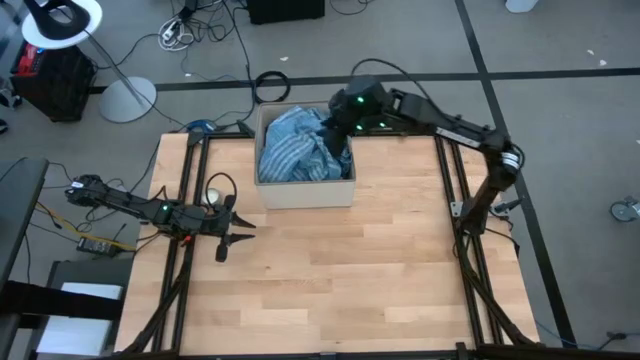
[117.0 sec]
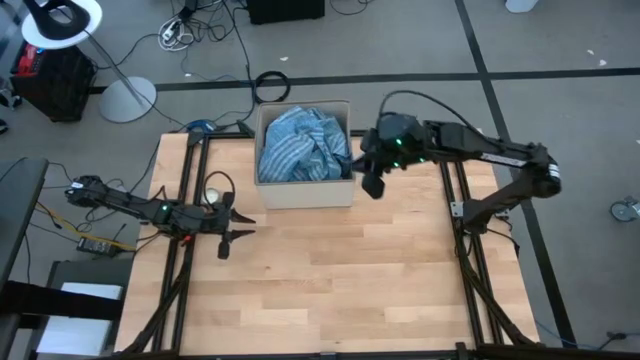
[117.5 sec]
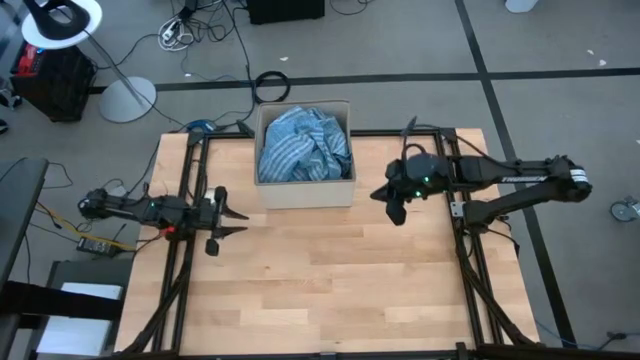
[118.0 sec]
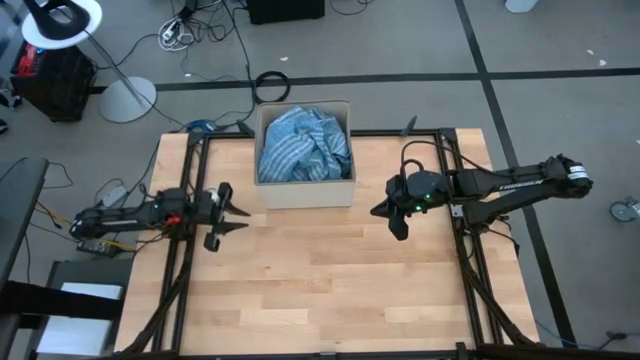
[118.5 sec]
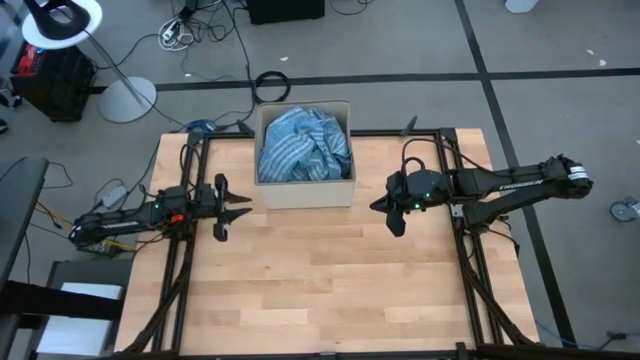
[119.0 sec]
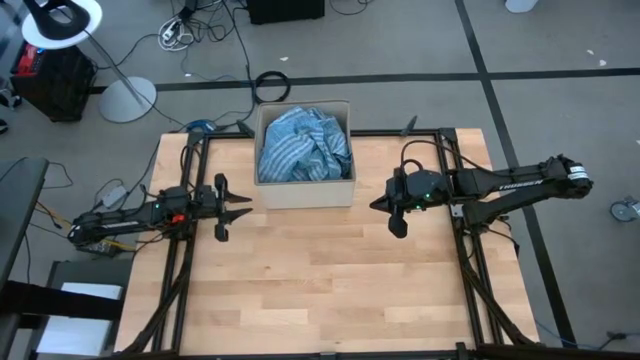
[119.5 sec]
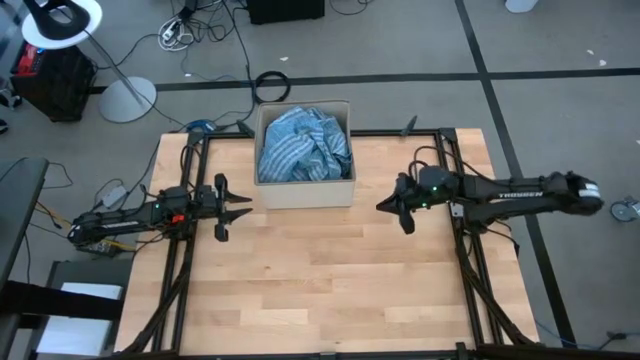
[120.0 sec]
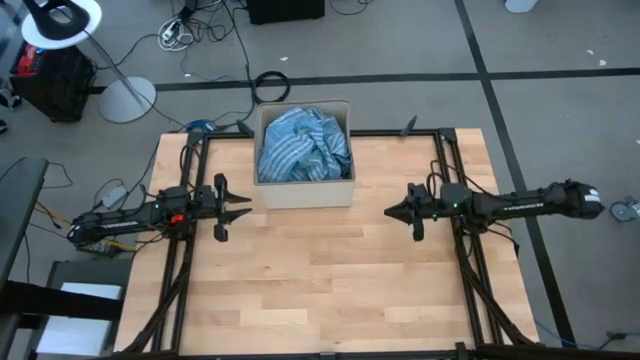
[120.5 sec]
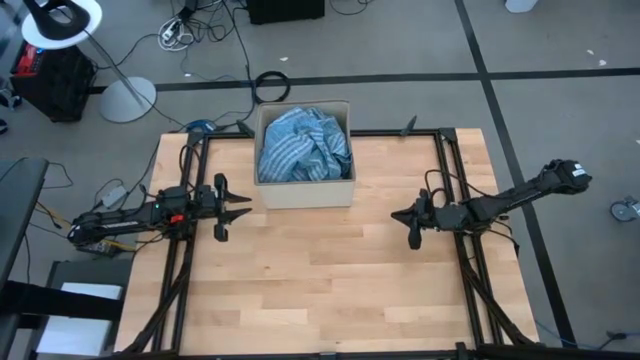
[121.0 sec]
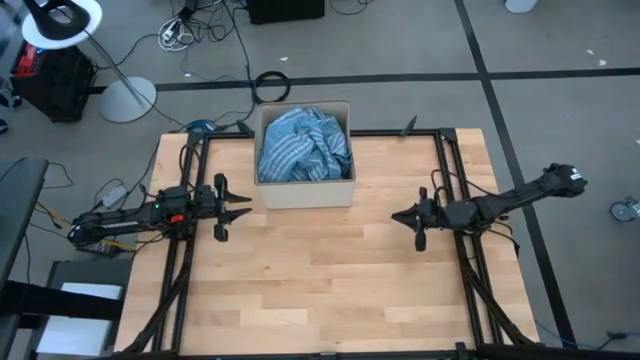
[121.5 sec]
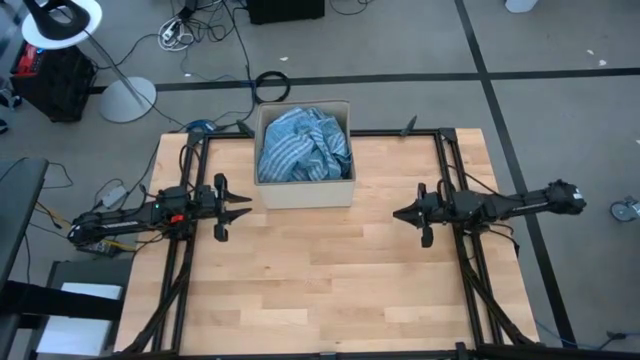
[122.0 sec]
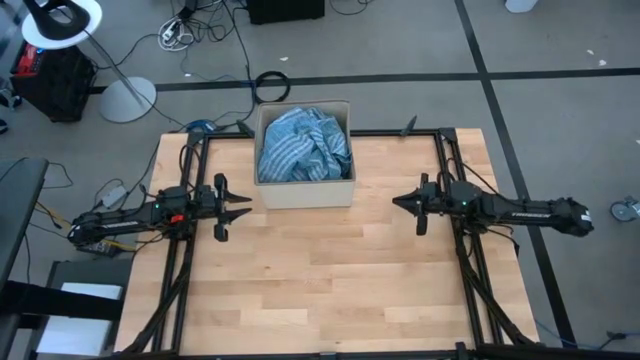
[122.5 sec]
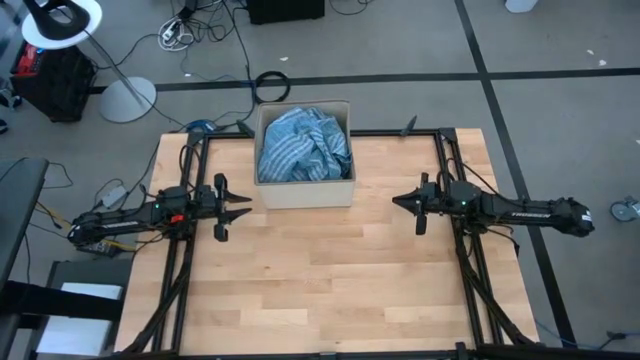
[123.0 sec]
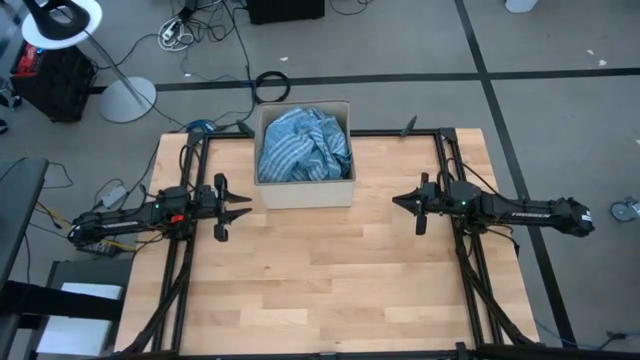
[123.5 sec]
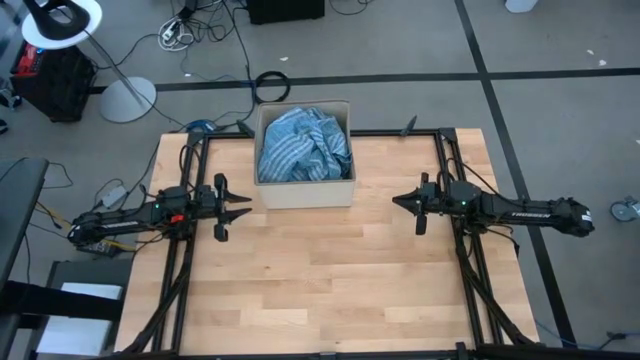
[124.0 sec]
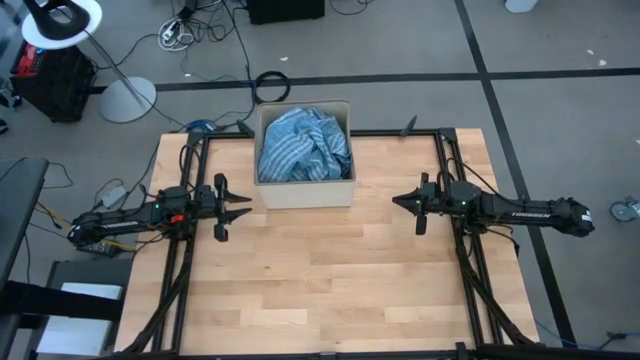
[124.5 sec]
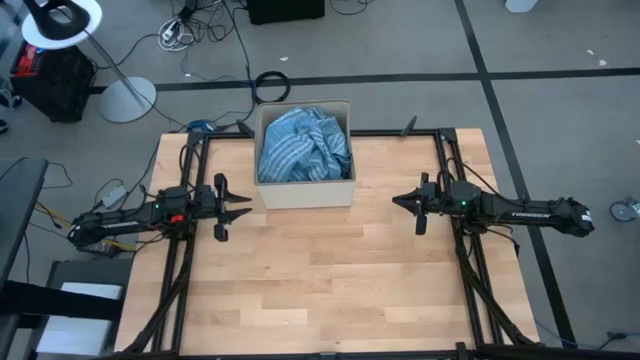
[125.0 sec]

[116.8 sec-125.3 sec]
Task: Sort clothes
Return to Home Position

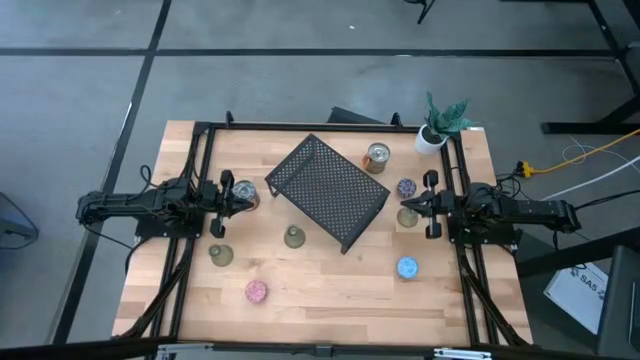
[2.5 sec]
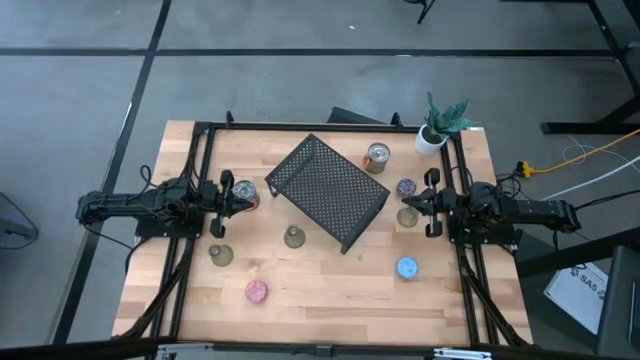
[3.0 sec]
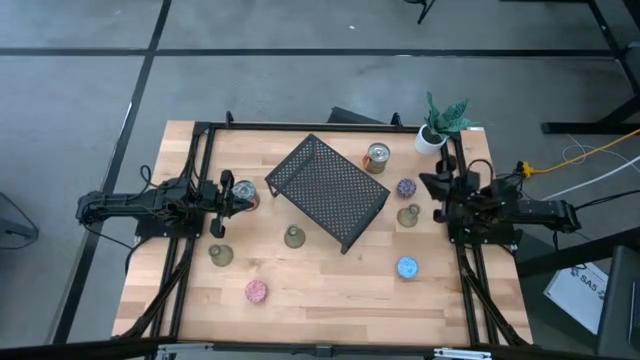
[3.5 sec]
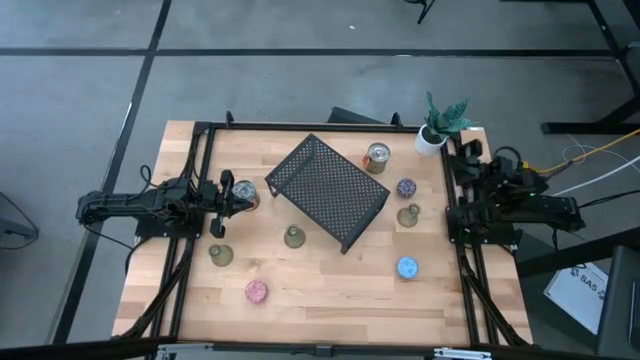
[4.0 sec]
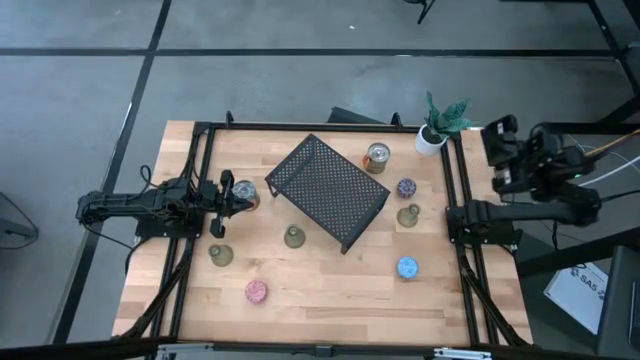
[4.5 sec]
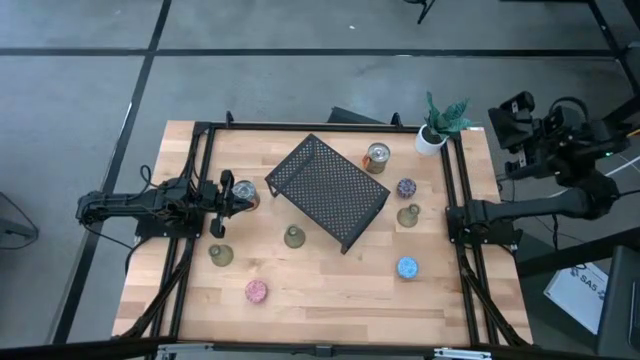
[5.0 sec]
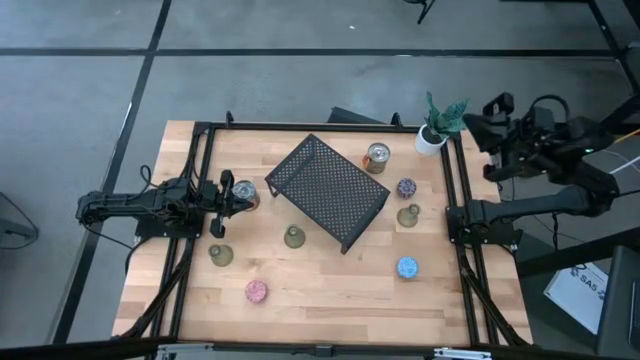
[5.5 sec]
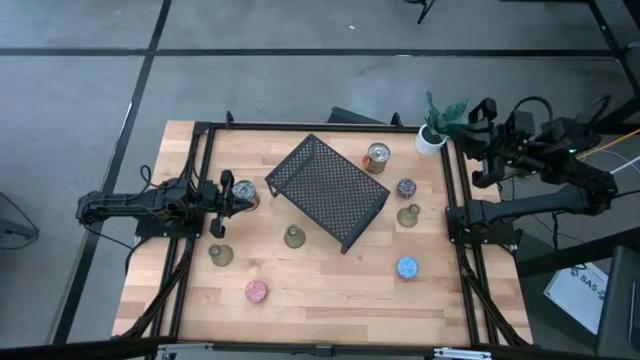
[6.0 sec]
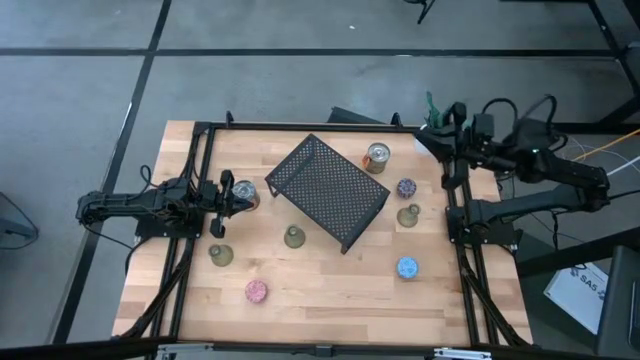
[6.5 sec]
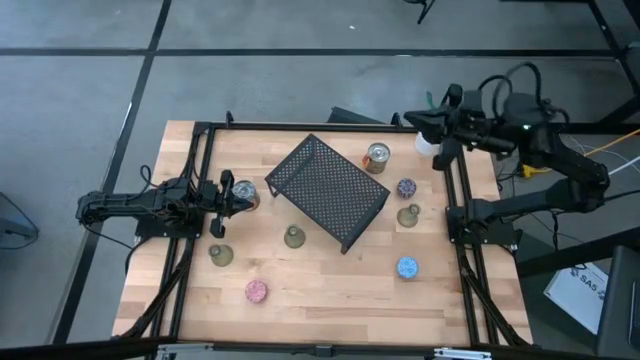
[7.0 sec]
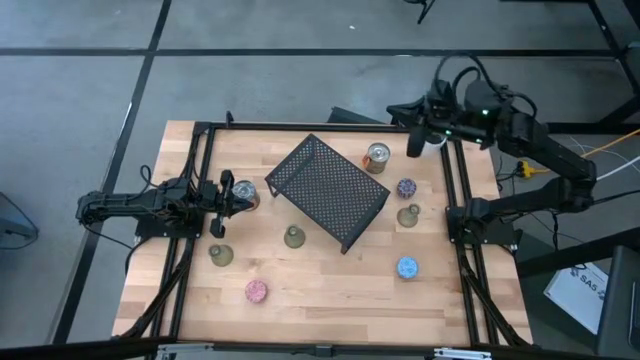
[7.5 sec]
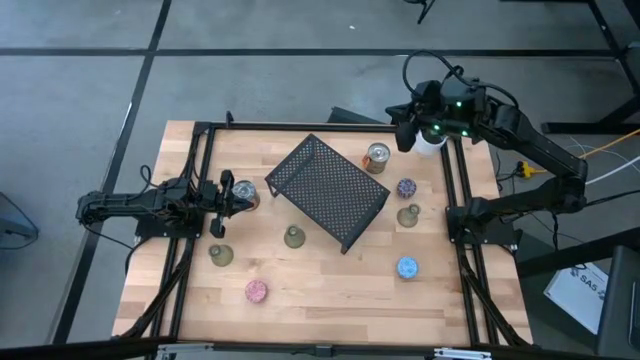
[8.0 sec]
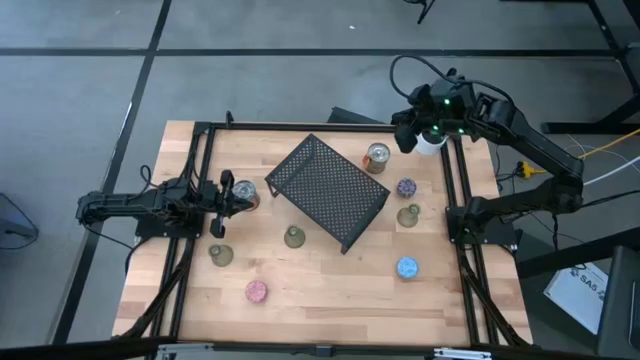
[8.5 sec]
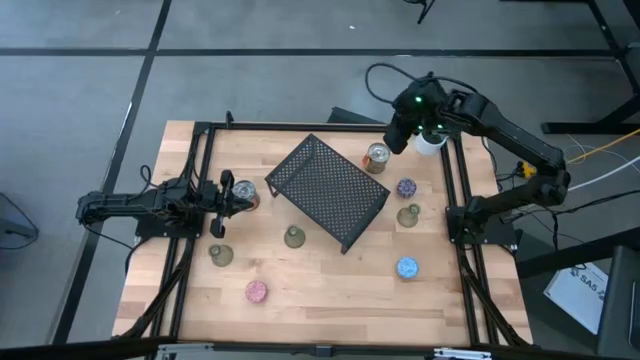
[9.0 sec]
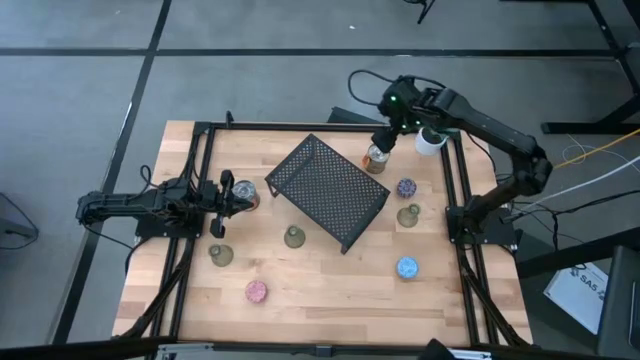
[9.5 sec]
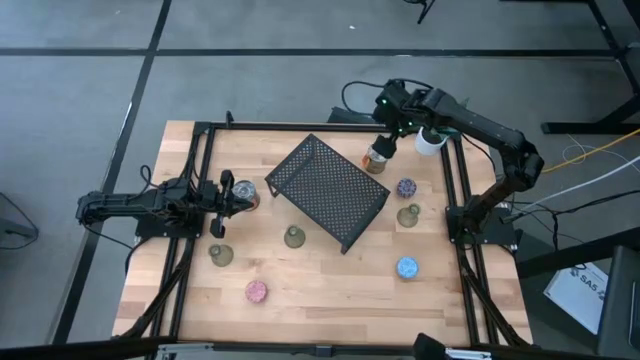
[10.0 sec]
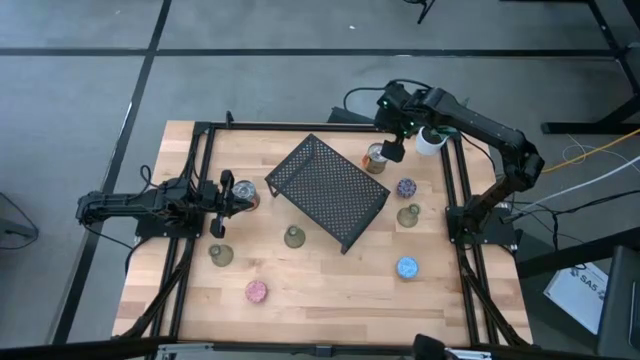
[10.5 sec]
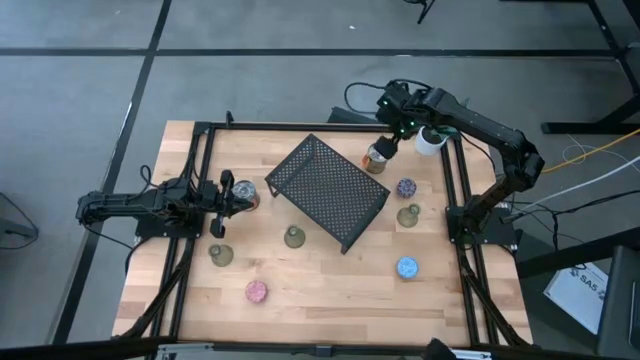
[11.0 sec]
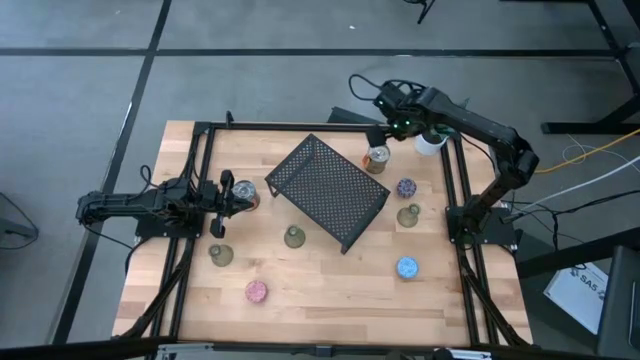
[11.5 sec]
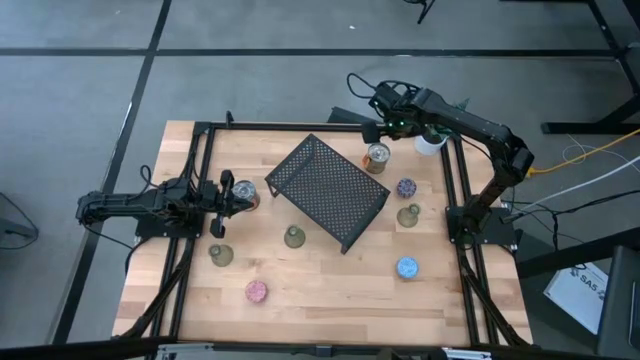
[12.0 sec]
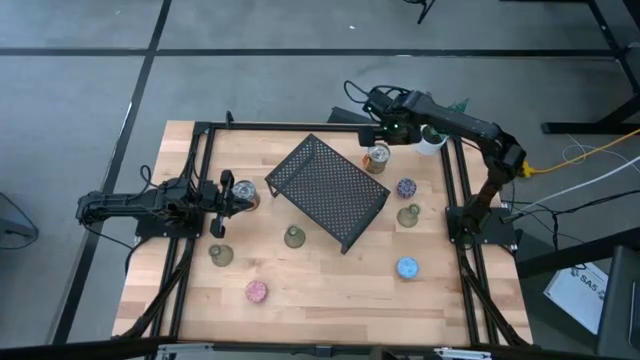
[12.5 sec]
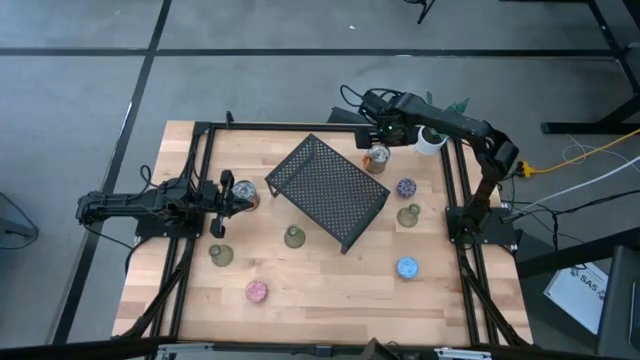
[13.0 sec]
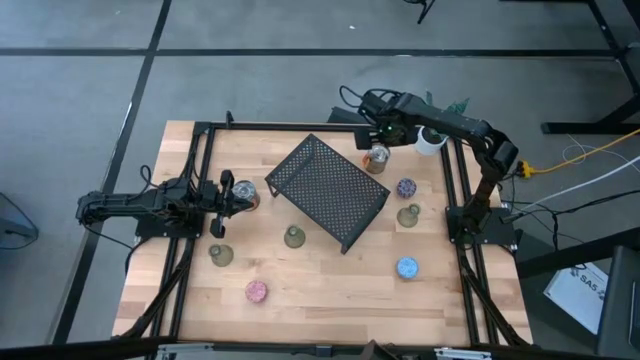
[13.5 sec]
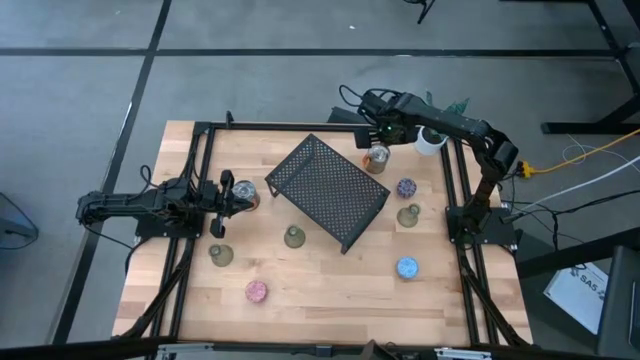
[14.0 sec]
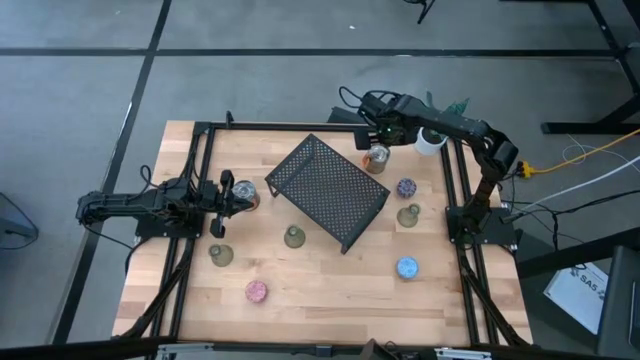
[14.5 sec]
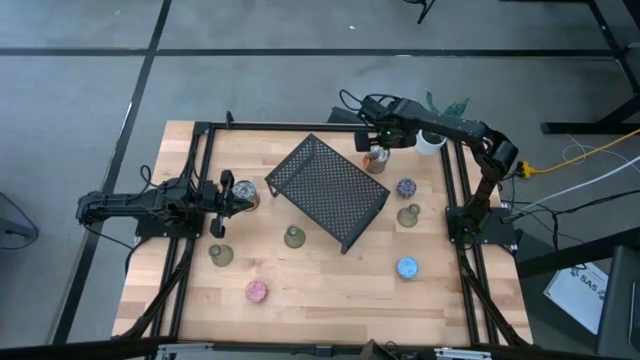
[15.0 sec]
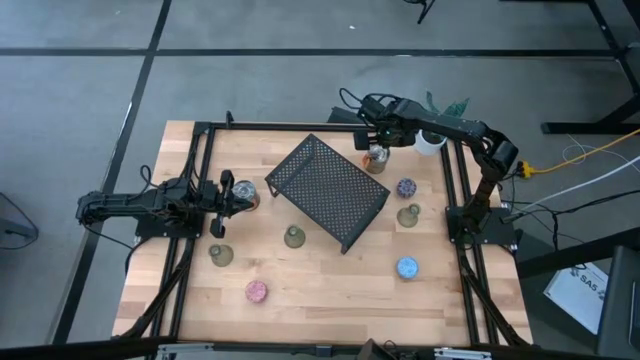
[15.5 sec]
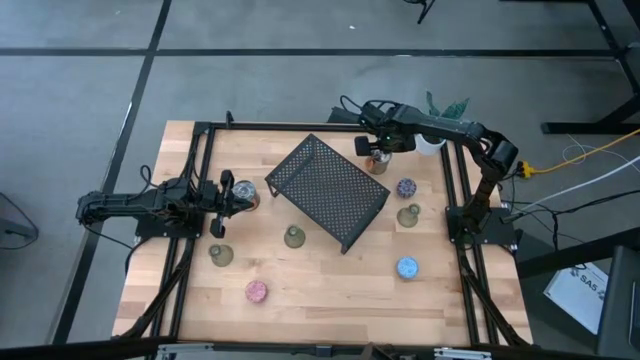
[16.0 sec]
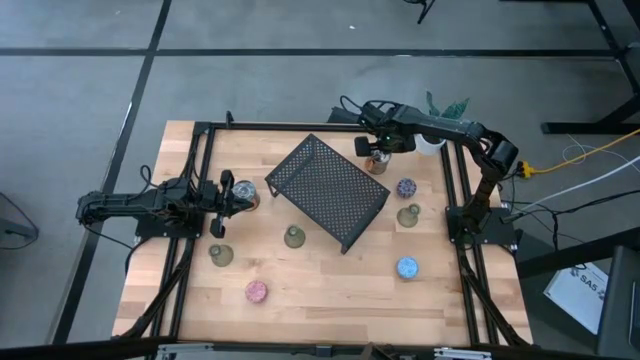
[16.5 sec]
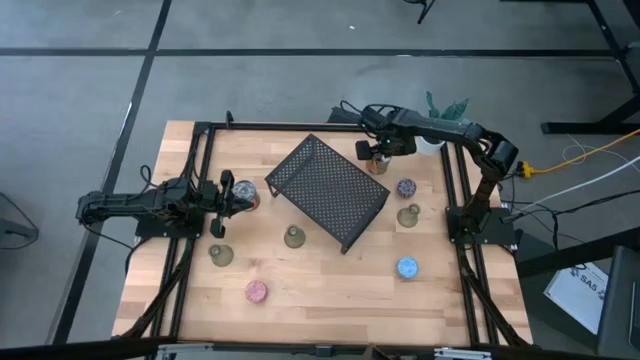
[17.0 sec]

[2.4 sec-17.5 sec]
Task: Pick & Place candle stick holders
Put the left brown scented candle on the shelf
